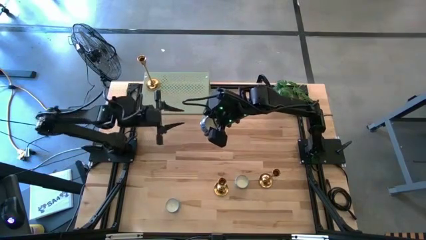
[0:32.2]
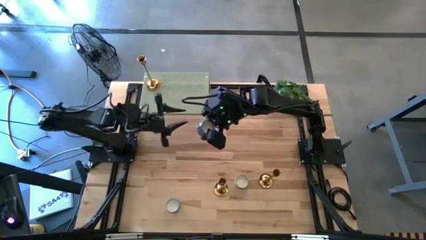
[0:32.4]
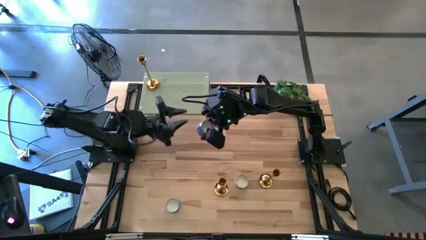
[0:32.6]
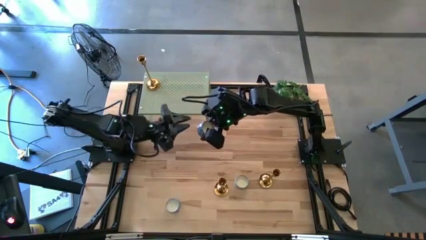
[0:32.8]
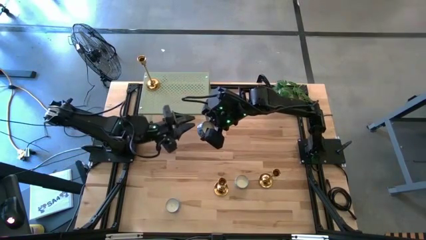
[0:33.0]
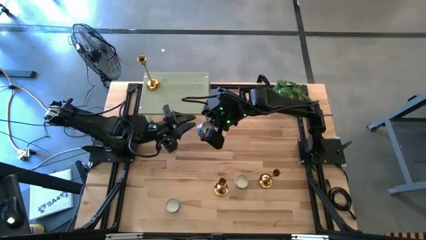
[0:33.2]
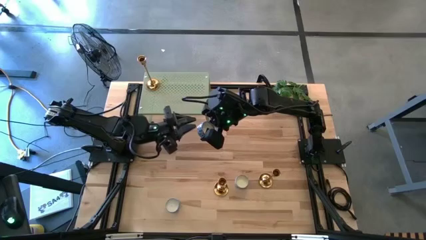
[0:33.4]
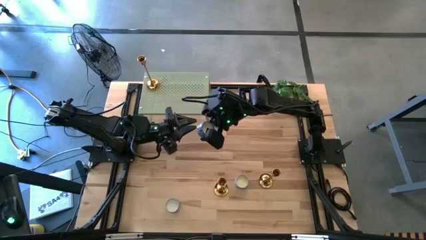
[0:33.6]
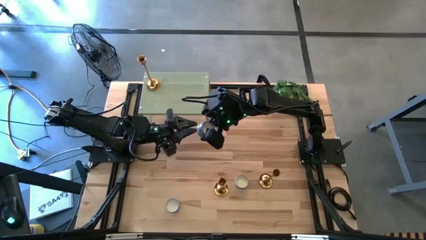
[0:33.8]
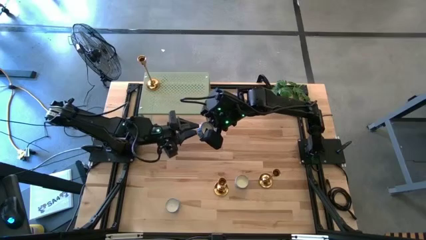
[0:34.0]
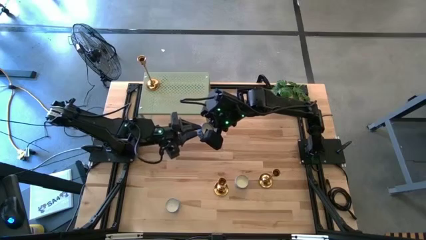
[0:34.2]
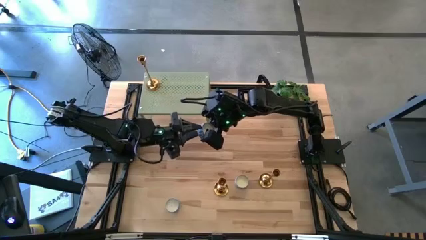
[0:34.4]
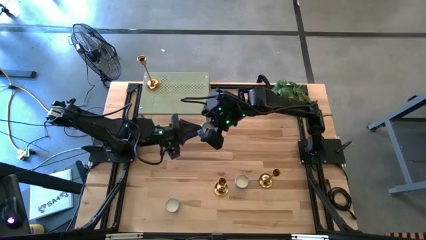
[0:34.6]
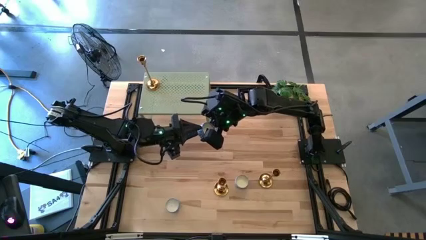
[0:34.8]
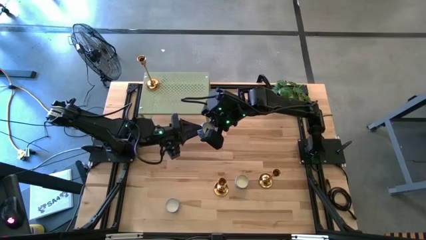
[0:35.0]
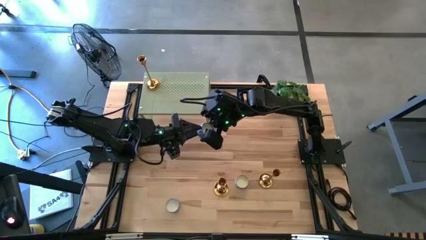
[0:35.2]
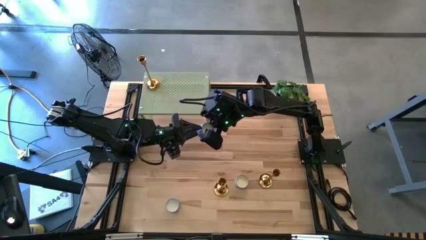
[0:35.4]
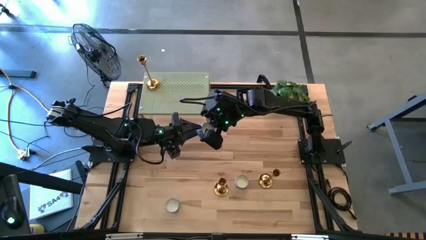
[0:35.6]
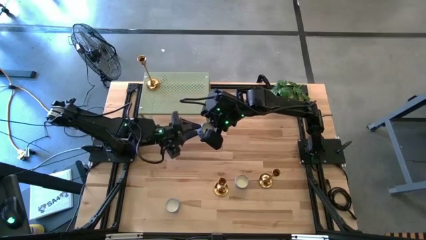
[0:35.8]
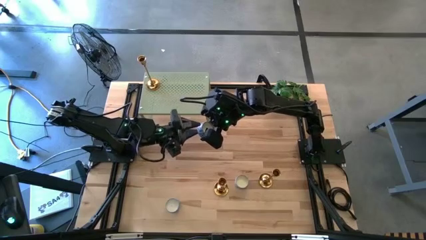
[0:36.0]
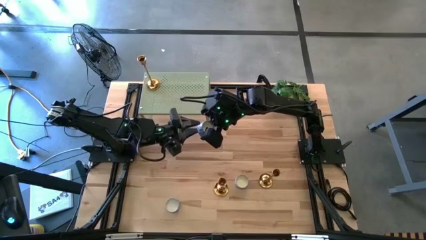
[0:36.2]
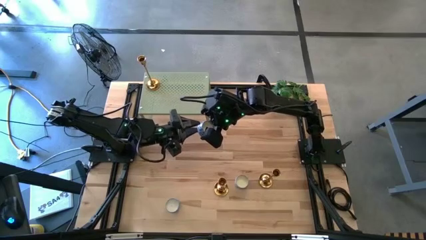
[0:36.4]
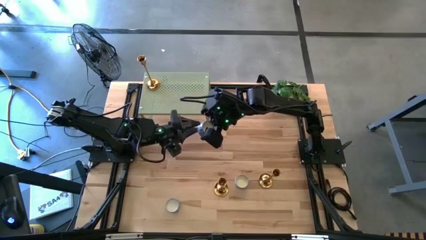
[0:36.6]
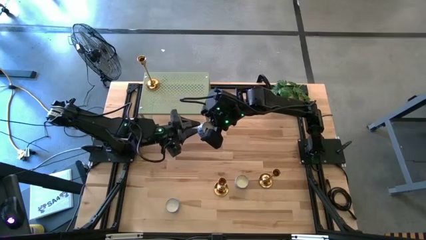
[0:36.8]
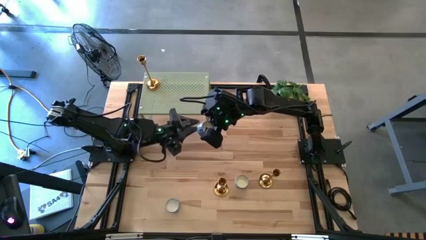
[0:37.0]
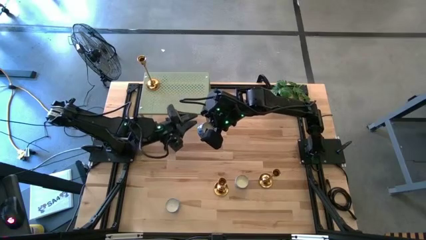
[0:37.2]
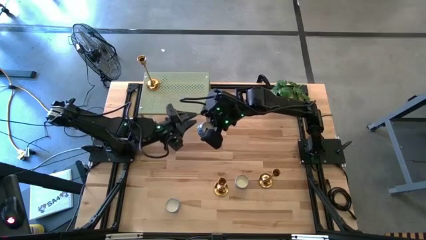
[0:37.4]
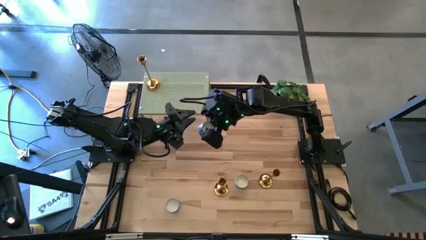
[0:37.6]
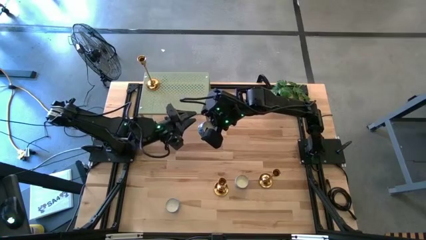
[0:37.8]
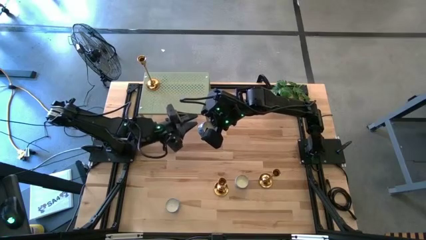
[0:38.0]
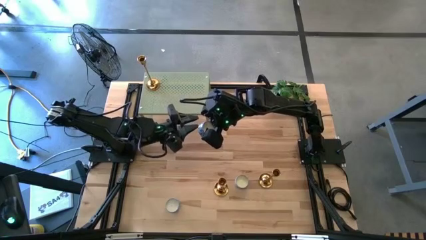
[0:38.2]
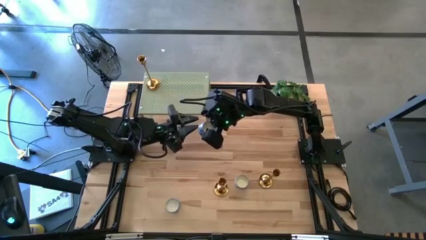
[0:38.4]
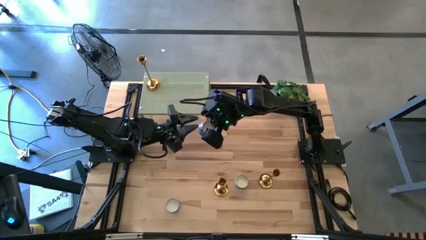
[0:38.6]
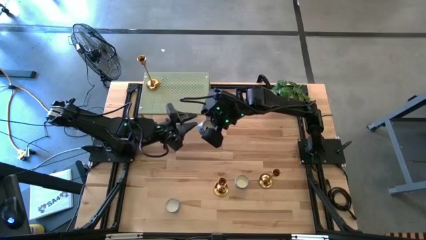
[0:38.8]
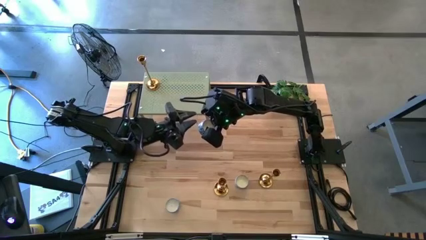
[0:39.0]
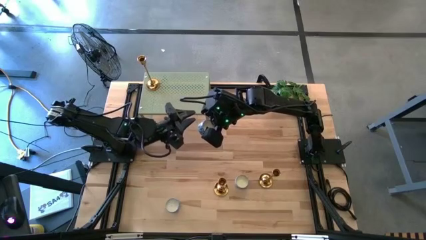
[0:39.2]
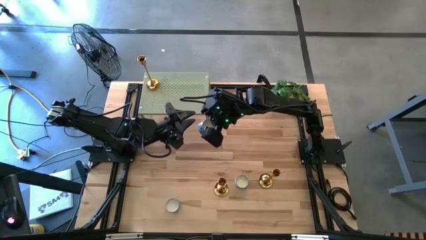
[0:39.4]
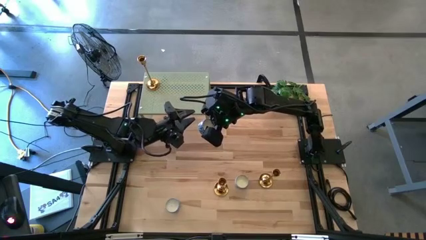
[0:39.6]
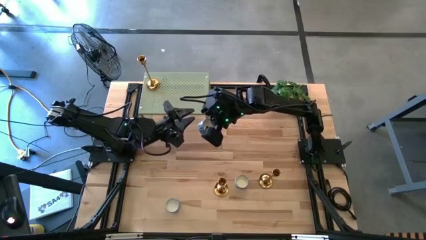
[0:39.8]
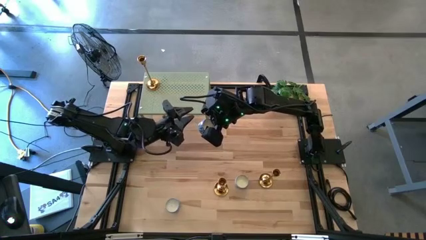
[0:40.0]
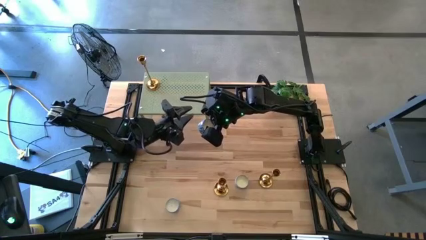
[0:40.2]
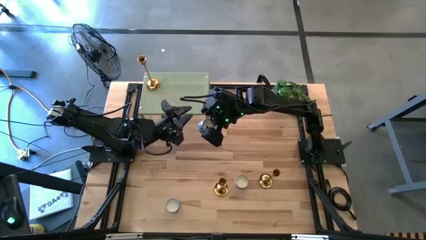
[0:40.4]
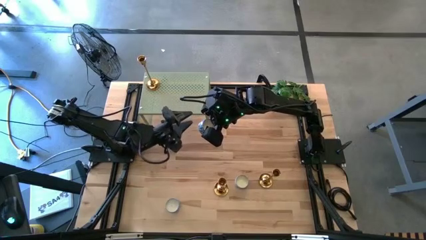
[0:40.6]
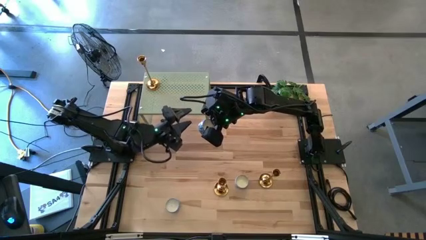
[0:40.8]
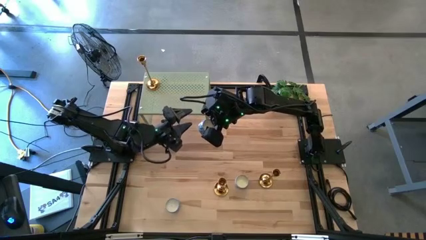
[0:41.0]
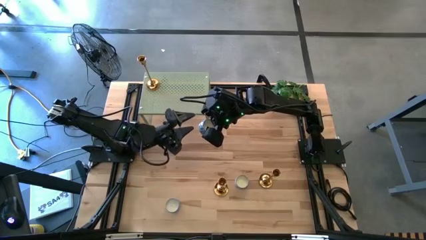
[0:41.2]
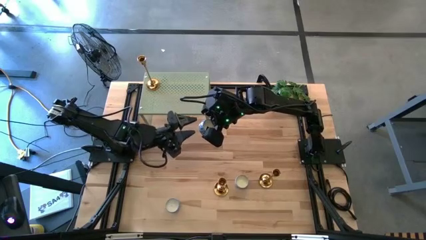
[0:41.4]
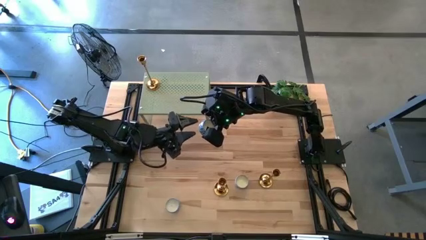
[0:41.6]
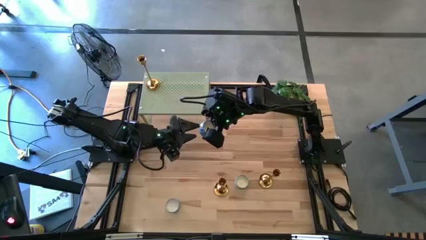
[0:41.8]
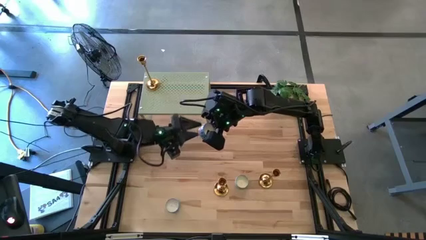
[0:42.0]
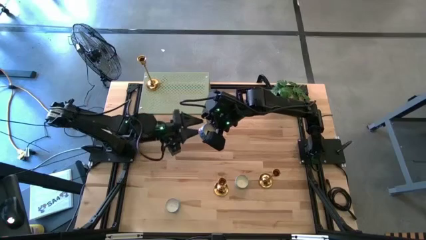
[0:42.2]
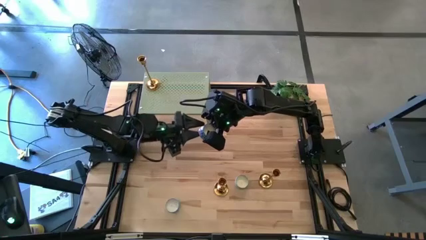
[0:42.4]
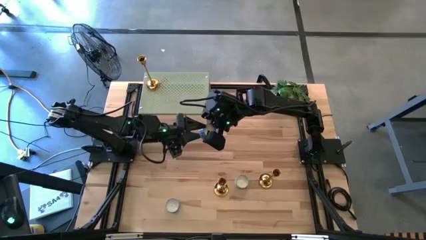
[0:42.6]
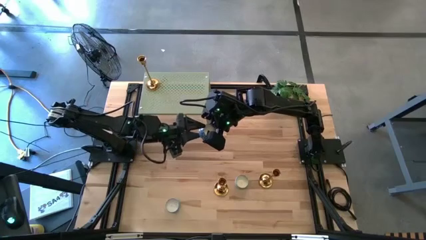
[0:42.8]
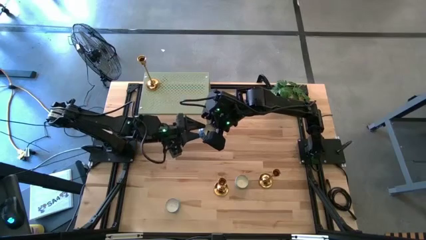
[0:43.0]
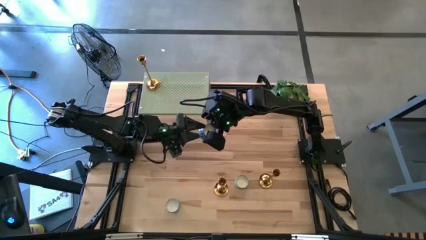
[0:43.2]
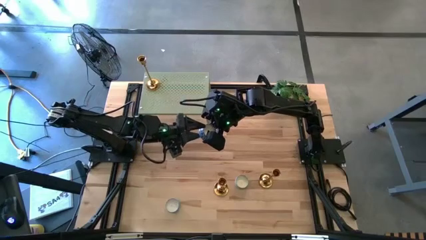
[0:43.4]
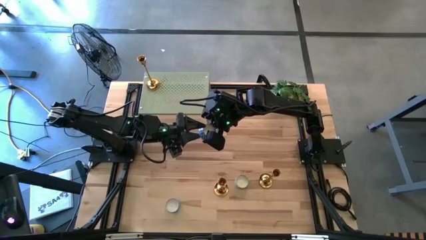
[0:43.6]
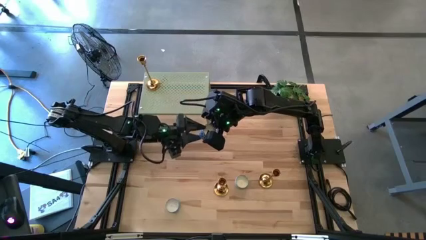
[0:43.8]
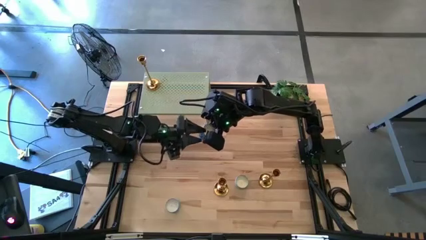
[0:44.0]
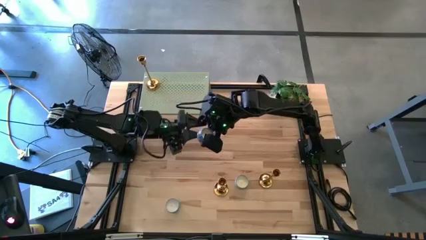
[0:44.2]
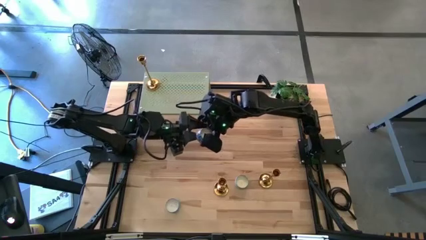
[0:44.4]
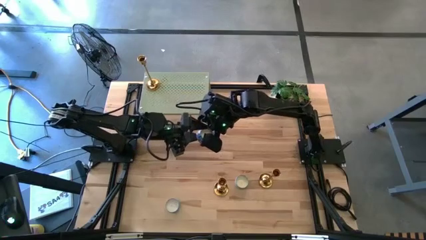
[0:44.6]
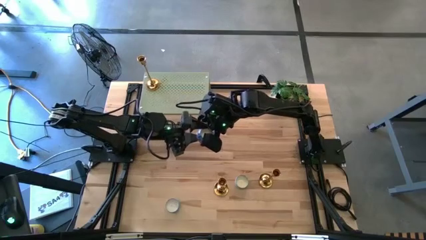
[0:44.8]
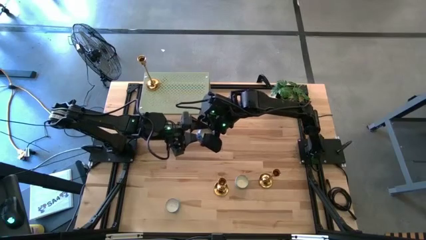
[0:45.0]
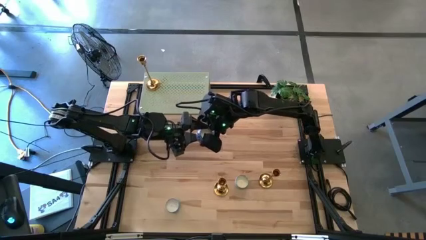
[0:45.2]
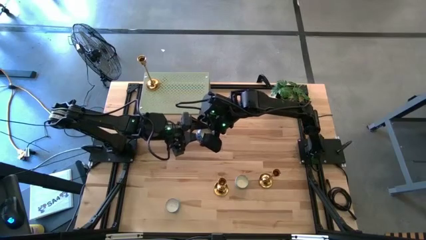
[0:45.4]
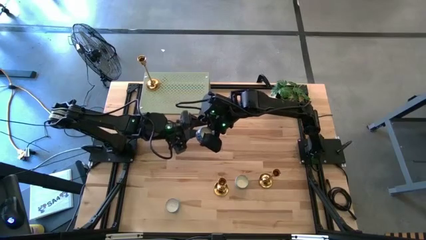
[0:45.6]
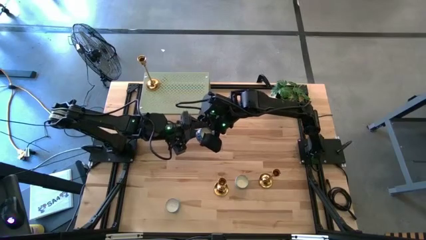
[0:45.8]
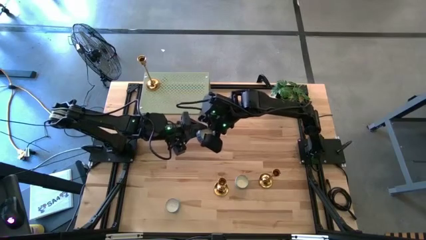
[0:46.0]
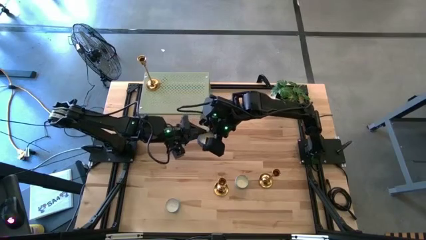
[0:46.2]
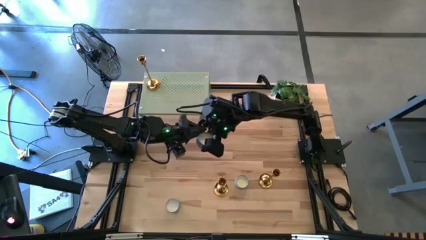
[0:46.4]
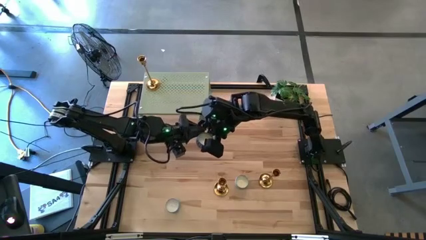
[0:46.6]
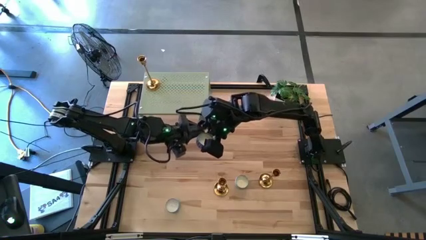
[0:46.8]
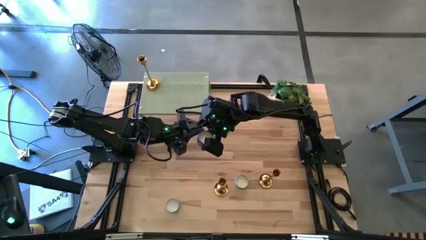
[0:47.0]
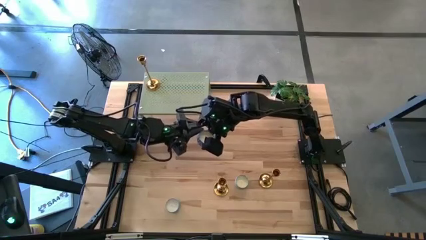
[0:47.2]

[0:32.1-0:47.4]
Task: Pick & Place candle stick holders
Put the top right blue patterned round candle on the shelf
